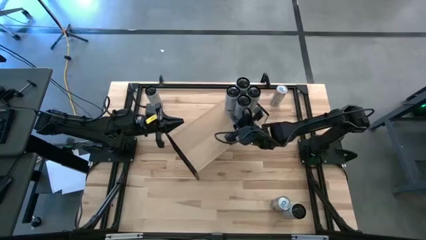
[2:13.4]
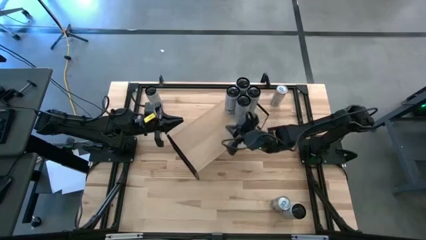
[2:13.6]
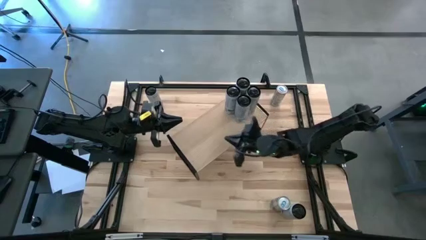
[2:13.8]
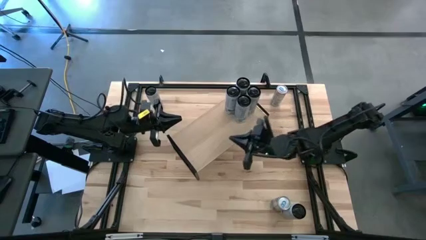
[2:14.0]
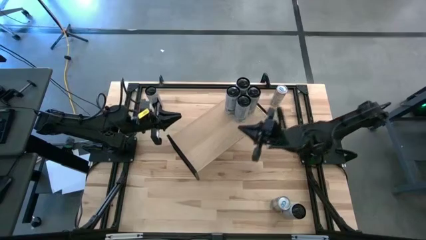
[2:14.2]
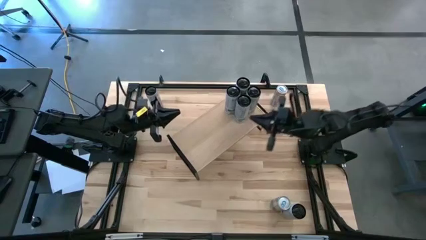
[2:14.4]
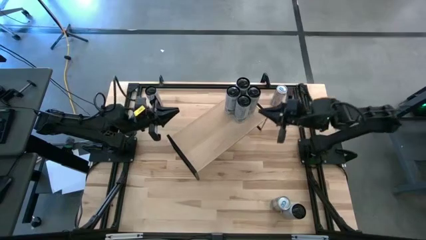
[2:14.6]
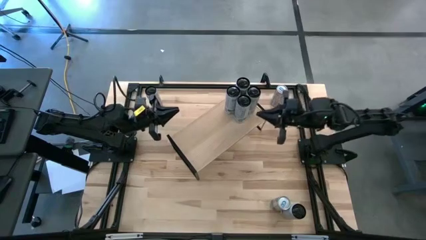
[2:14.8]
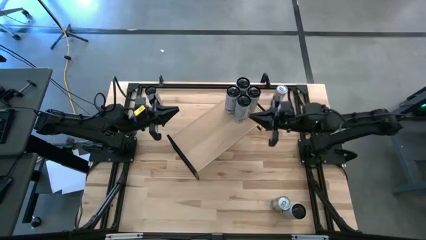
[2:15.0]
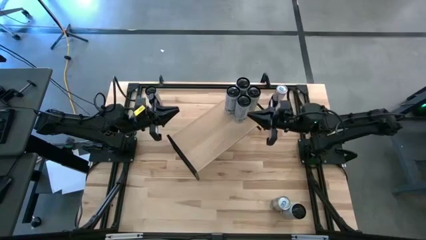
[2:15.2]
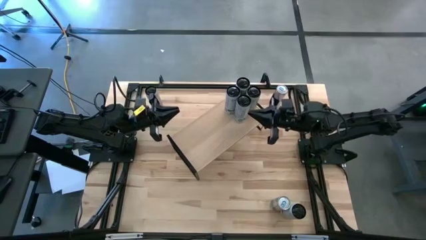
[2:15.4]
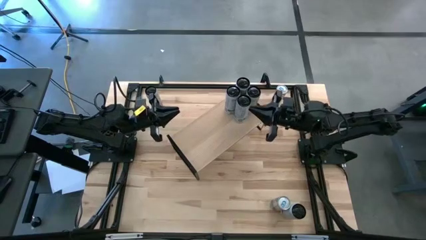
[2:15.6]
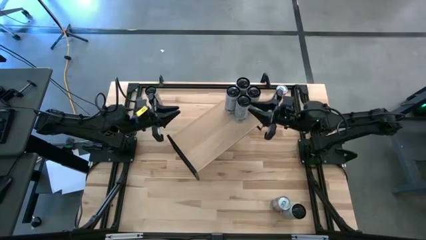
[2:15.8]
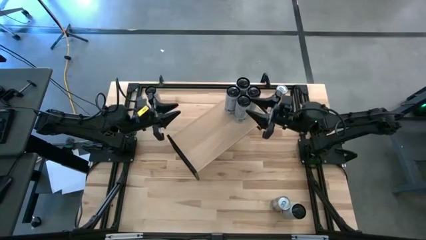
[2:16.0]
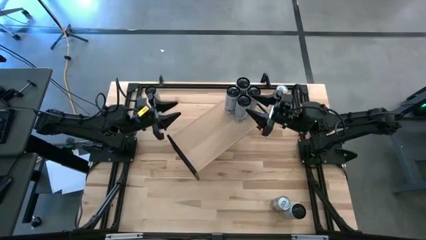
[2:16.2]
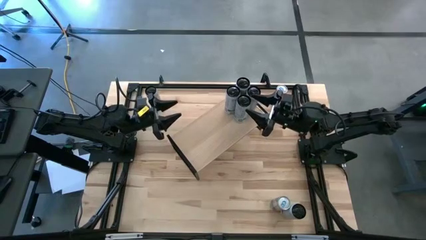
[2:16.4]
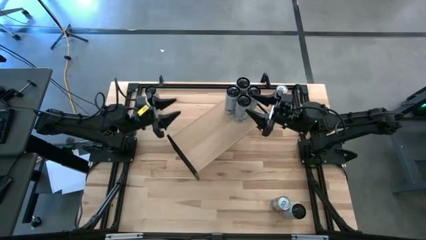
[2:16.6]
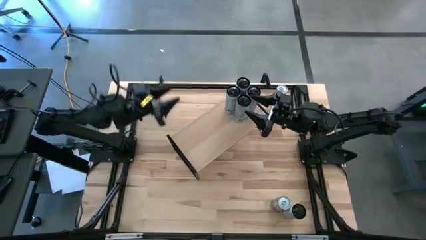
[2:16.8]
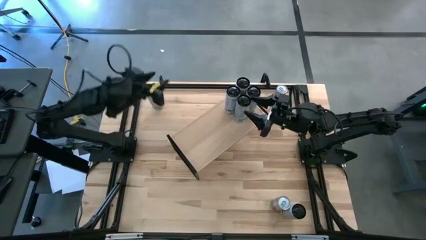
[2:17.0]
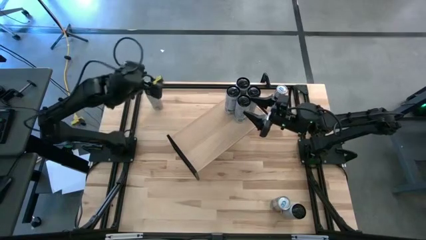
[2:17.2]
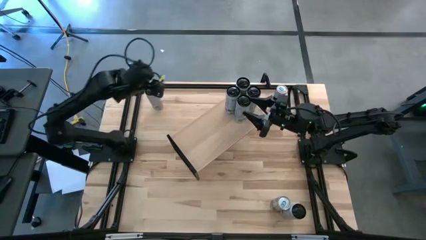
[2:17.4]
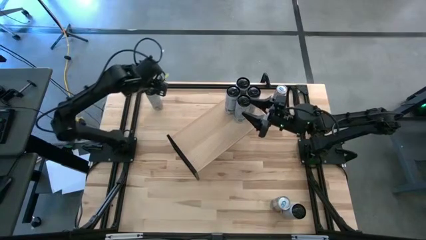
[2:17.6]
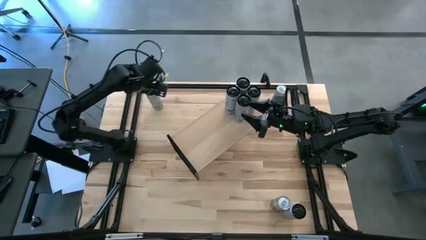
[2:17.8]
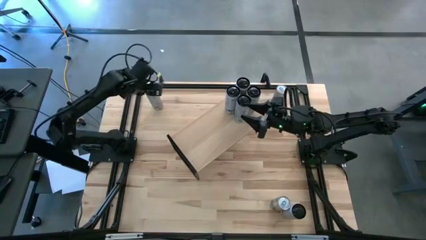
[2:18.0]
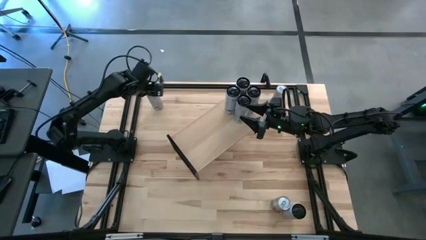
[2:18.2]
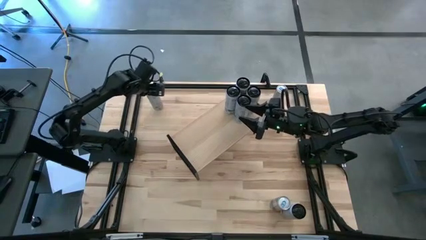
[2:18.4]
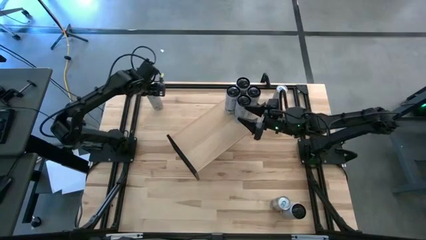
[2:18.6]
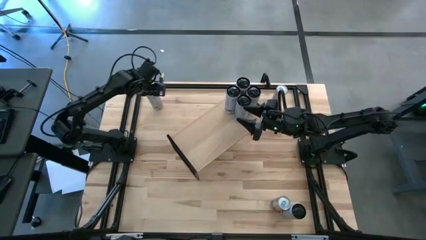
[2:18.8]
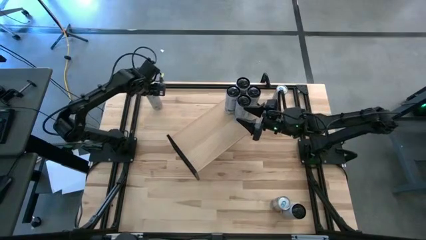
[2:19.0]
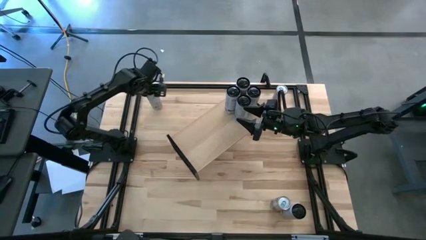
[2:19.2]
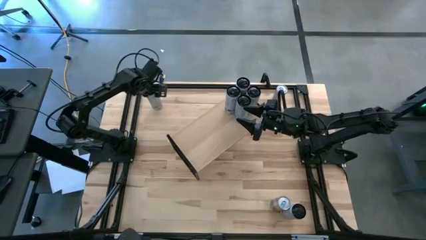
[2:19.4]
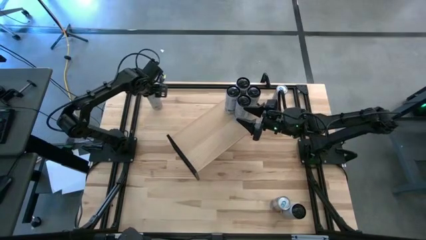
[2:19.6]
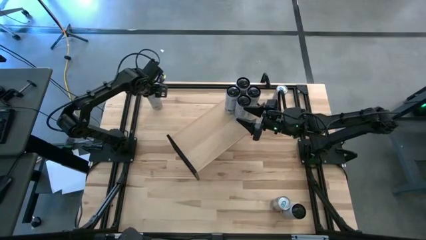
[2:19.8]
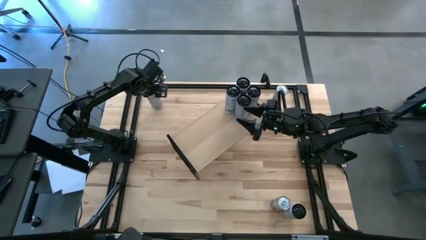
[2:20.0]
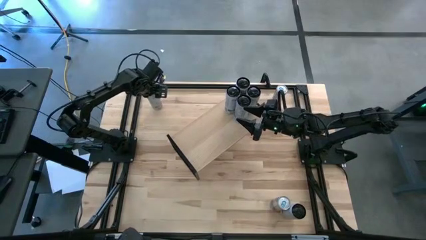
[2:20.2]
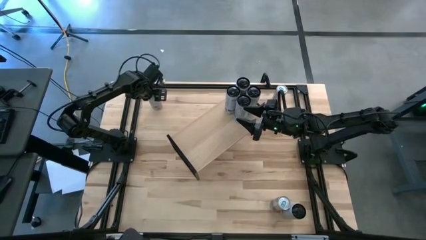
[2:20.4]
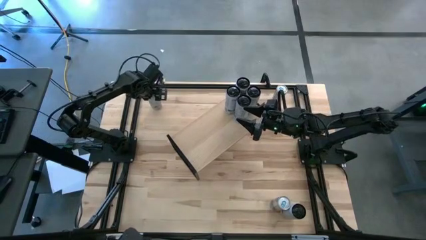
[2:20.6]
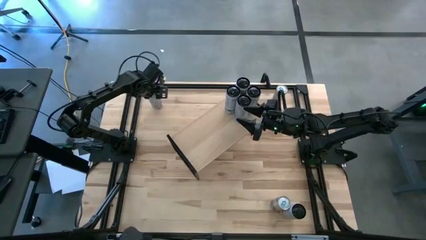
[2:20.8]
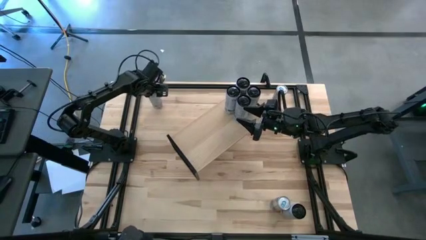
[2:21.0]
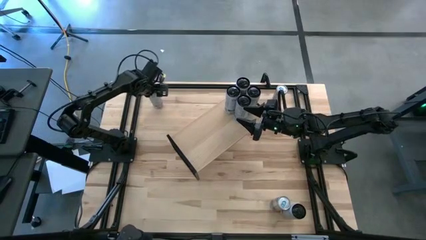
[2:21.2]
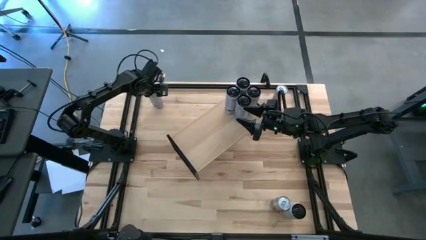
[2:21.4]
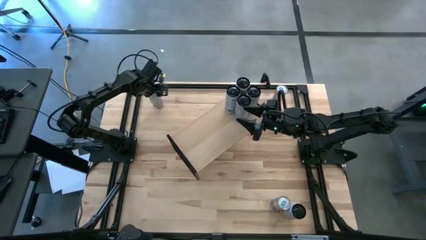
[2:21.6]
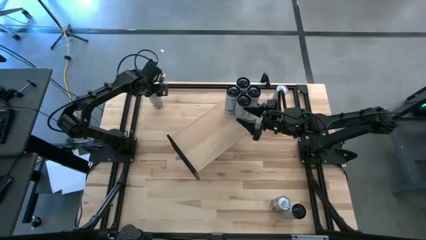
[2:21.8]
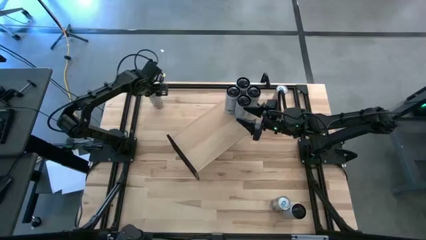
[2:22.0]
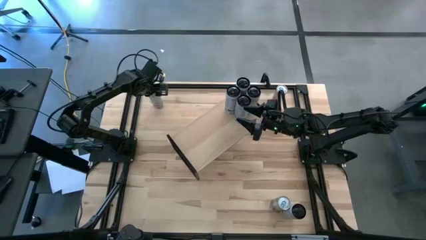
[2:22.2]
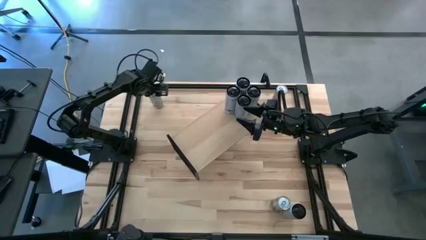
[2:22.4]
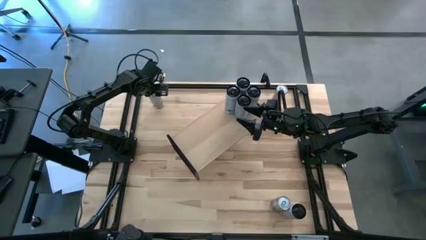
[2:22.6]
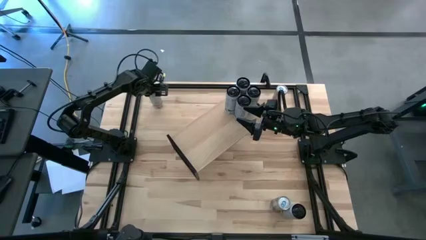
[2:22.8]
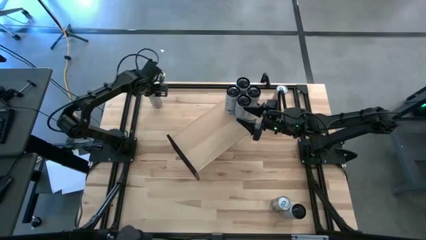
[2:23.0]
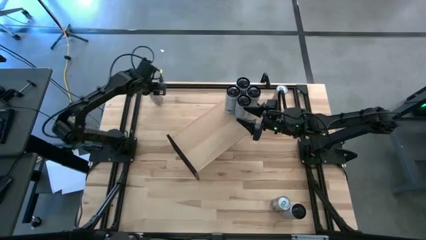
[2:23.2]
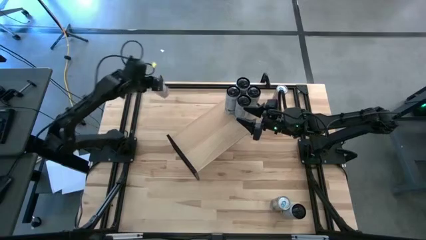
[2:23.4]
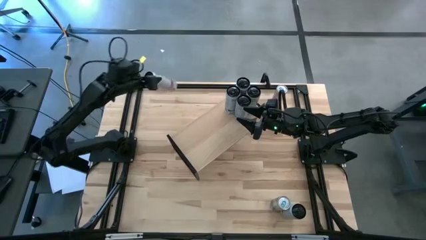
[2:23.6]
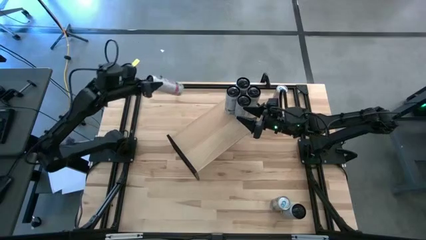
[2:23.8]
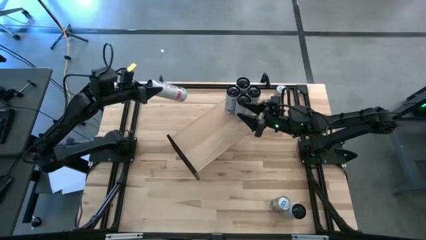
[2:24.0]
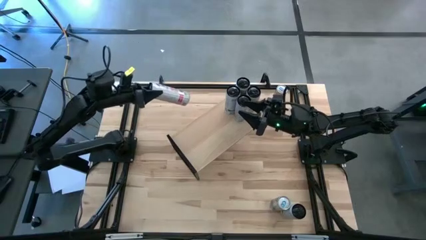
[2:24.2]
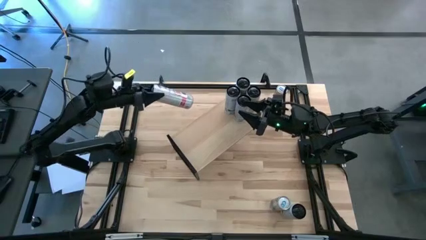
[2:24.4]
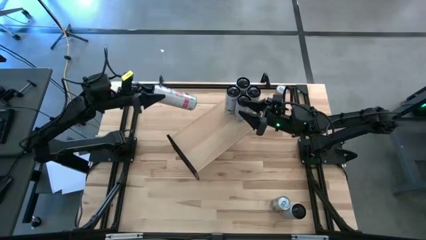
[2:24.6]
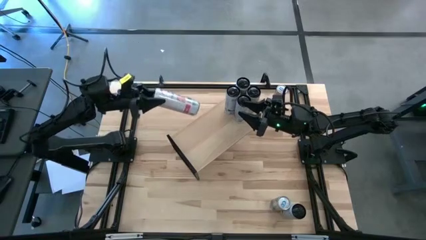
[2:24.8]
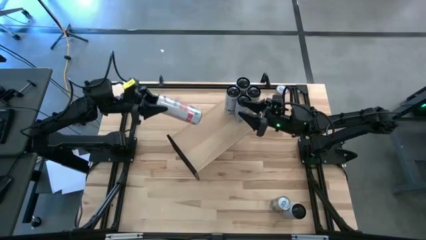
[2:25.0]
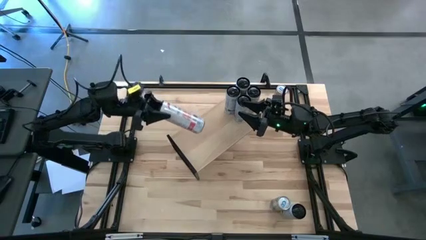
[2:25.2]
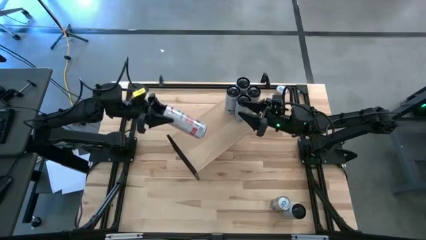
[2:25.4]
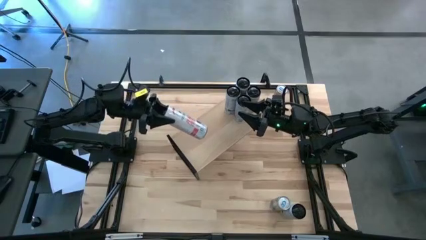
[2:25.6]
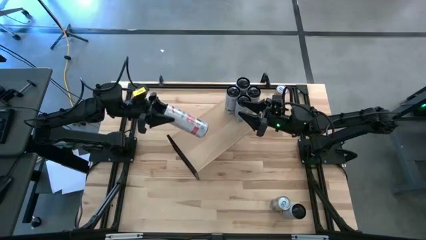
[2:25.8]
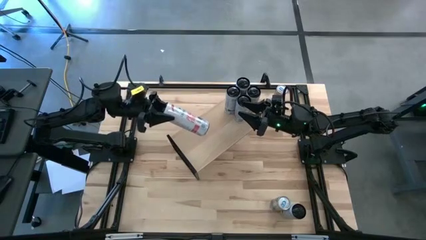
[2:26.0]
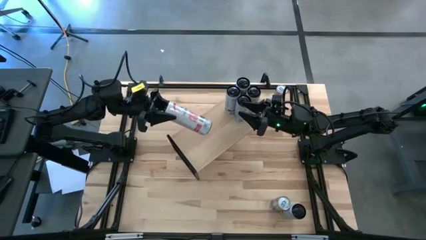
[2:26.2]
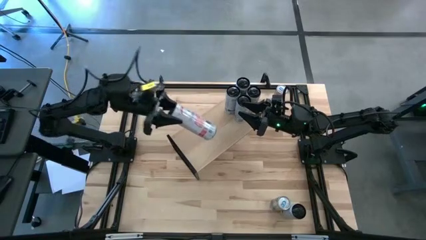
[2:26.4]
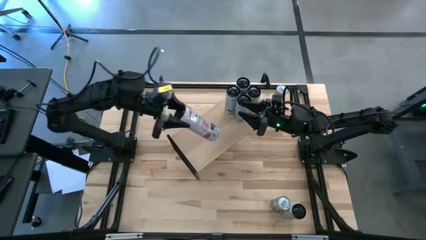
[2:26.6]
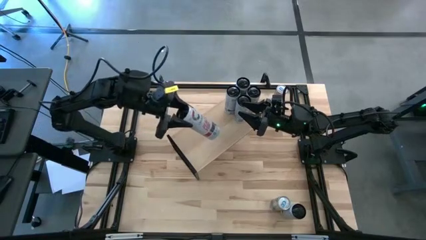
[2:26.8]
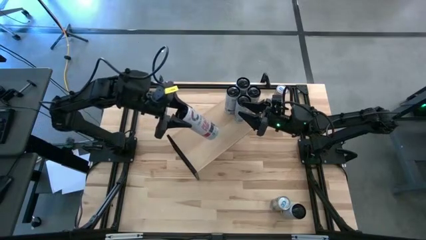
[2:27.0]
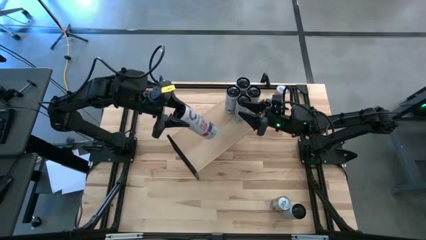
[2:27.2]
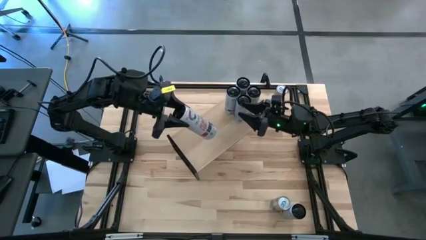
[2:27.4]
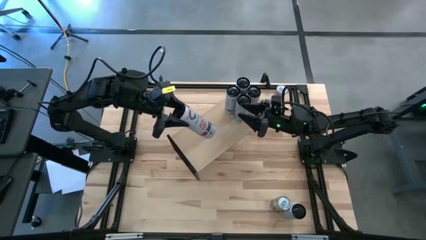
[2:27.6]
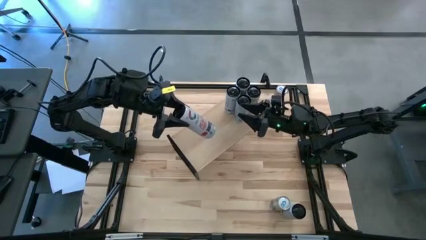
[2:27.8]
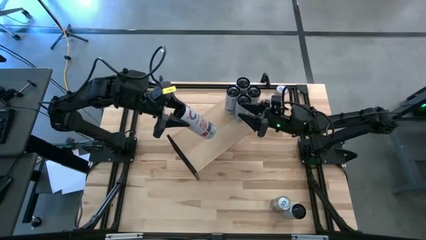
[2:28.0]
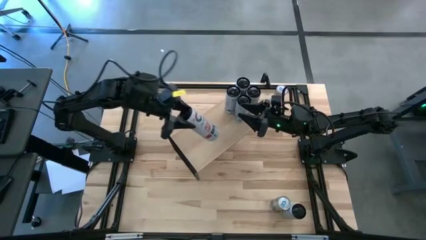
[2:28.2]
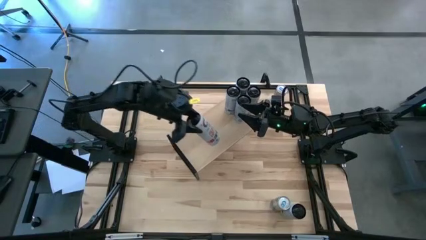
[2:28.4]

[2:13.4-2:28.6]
Task: Place canned beverage on shelf
Put the top white-pink soda can on the shelf
